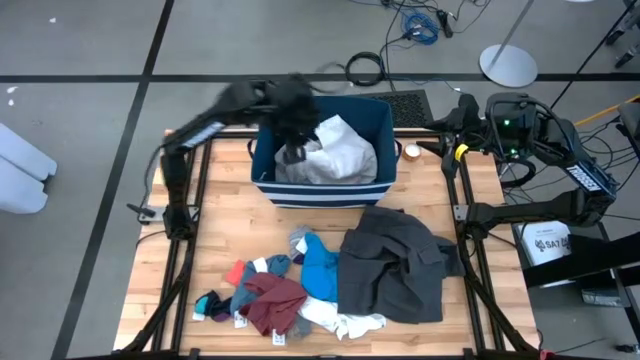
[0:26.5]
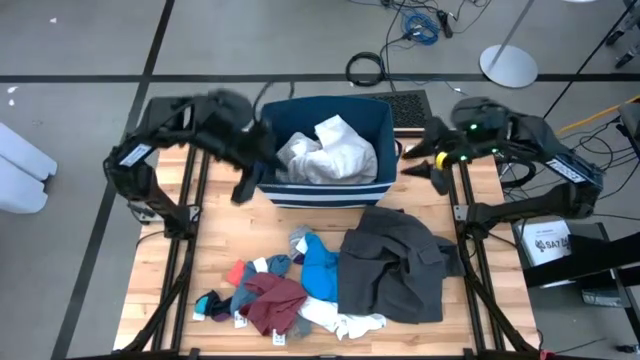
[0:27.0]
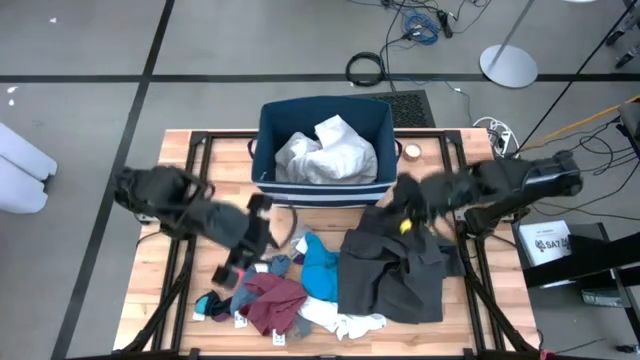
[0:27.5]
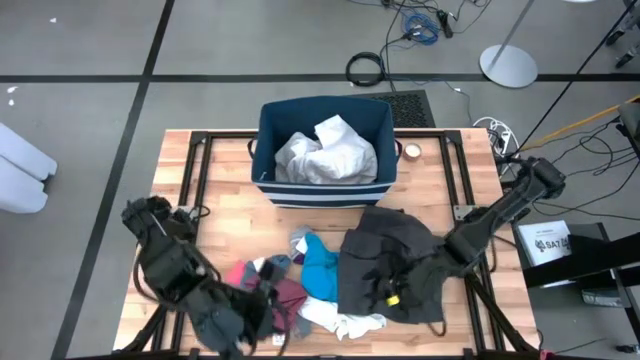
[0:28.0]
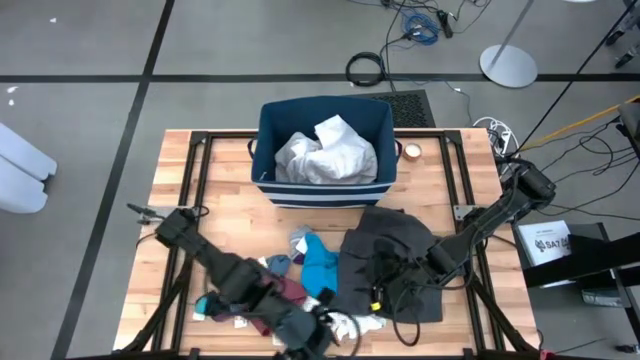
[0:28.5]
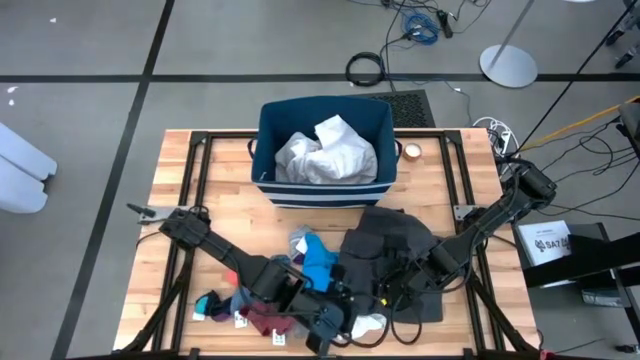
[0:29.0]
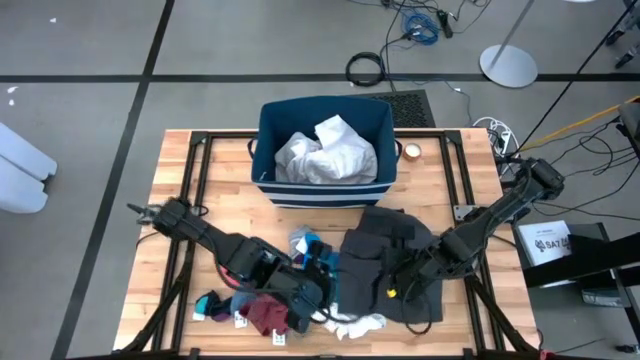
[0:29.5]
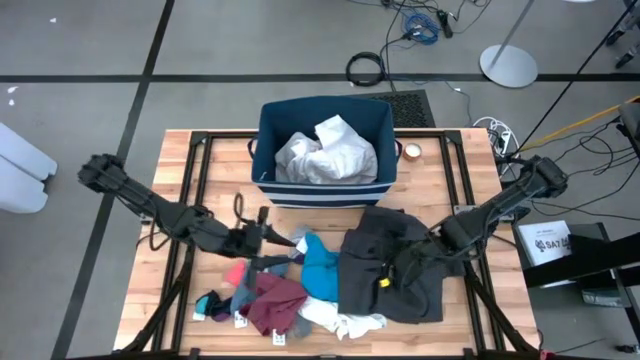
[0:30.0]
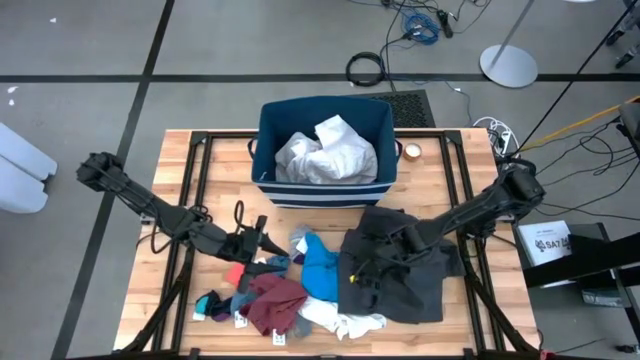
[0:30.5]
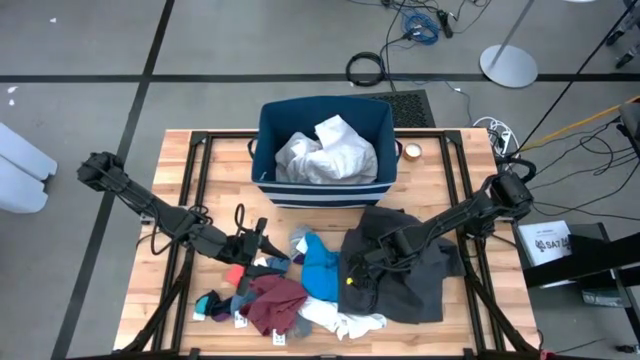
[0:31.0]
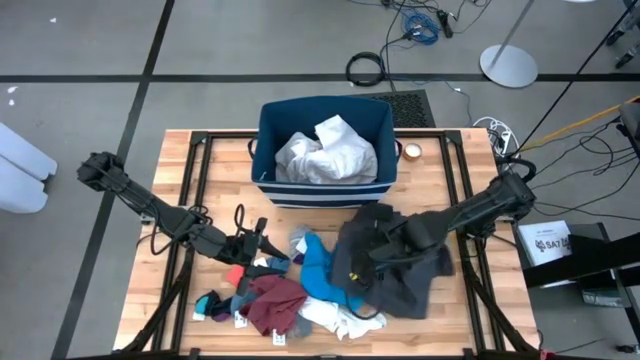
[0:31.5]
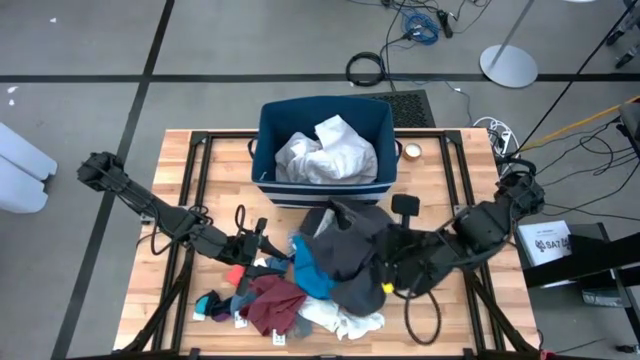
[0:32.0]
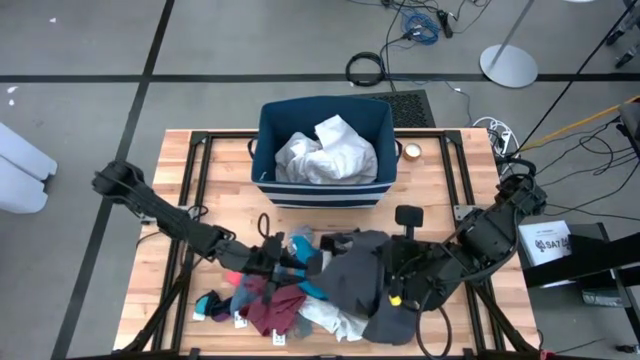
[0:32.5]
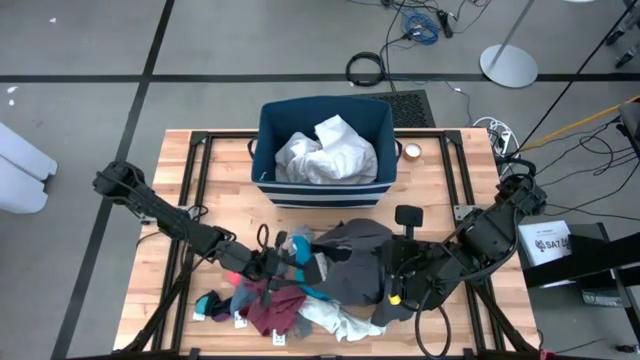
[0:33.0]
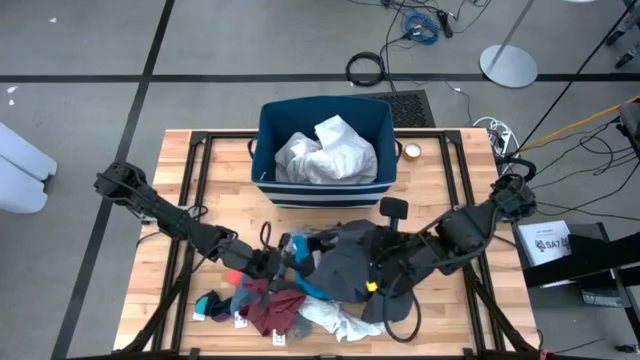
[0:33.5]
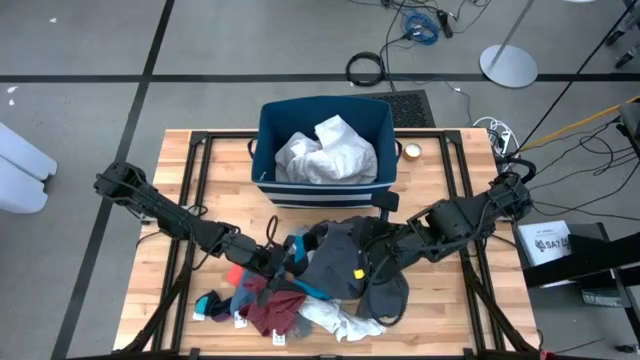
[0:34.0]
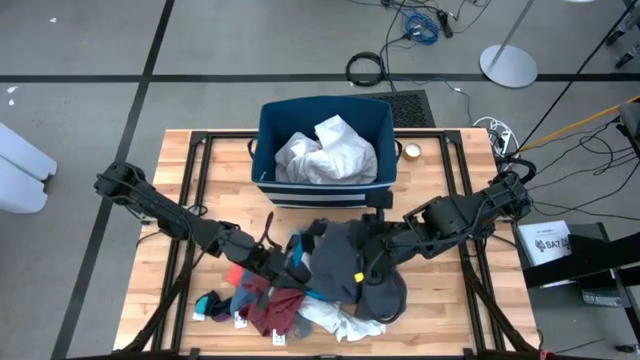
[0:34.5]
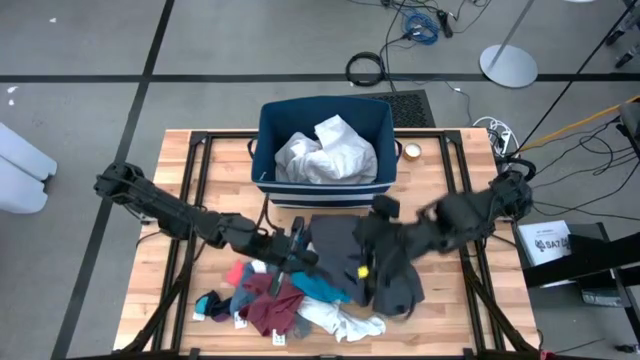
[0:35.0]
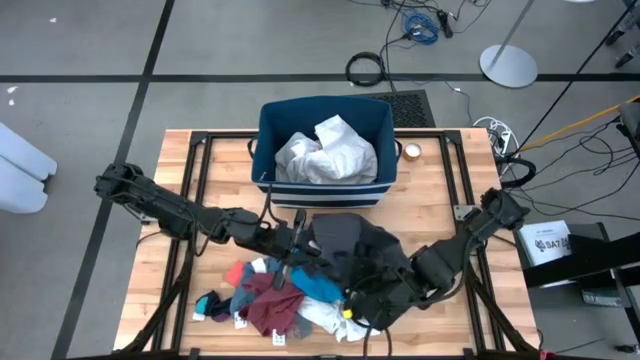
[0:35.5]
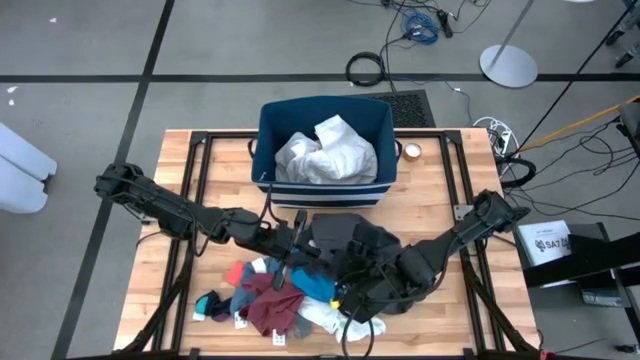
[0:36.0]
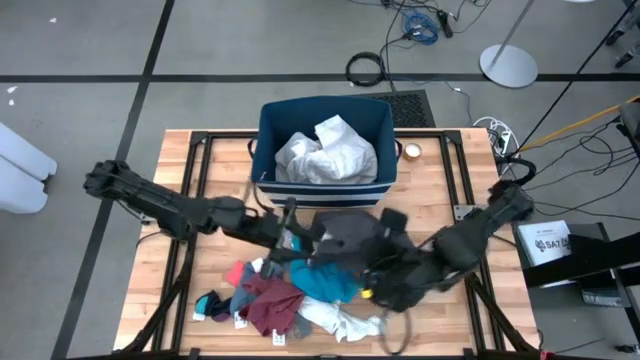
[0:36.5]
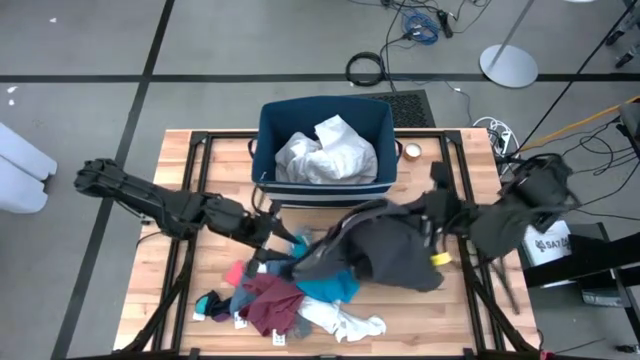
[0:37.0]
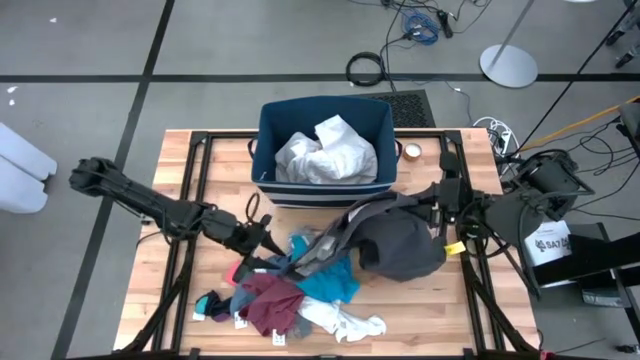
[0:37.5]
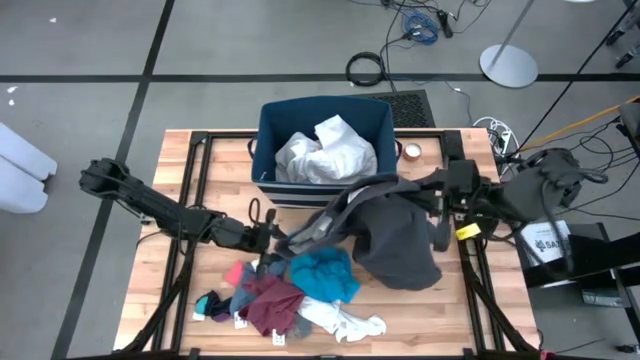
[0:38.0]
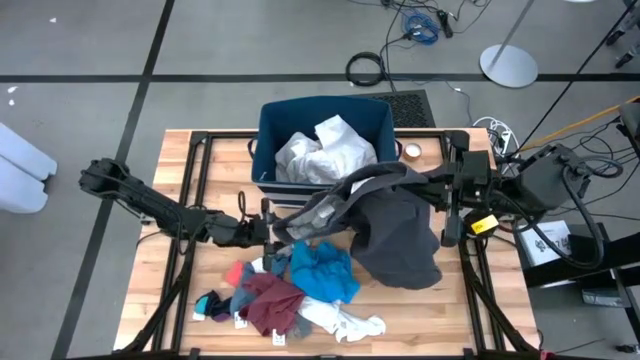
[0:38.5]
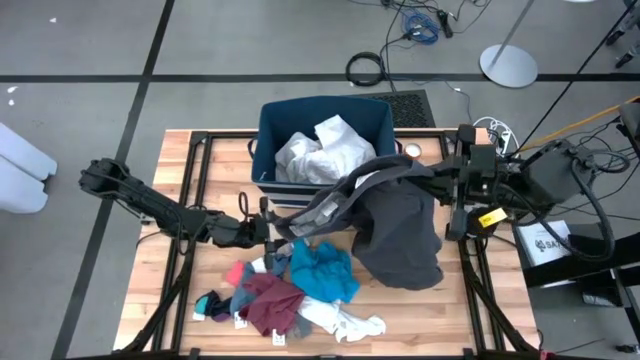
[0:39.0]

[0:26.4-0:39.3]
Task: Sort clothes
Put the dark gray shorts into the blue bin

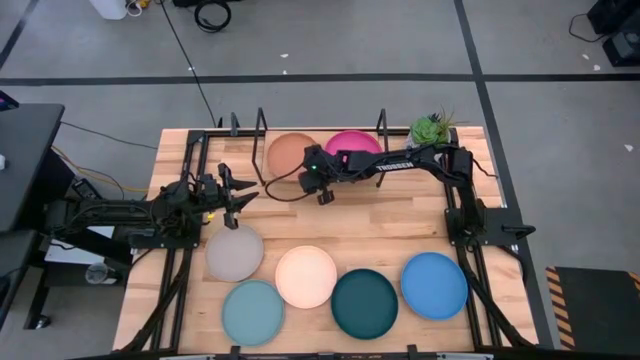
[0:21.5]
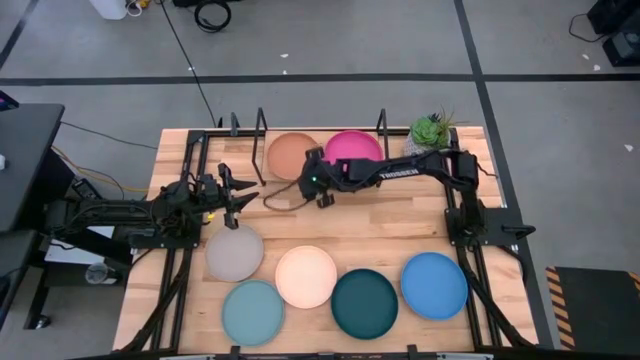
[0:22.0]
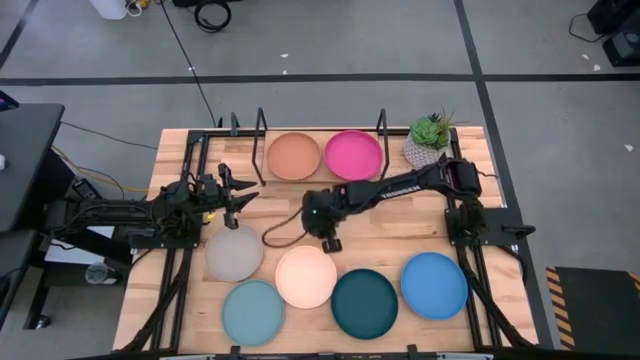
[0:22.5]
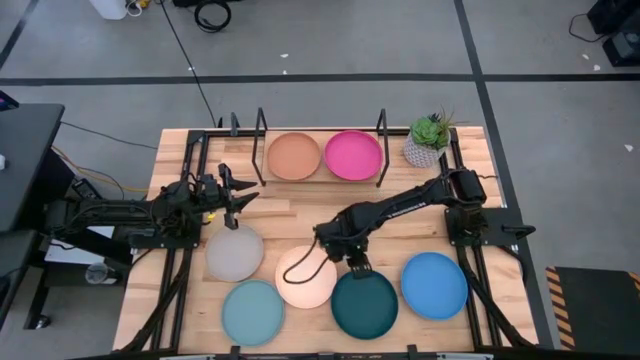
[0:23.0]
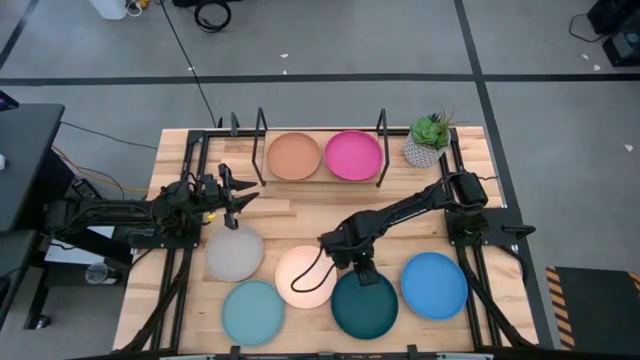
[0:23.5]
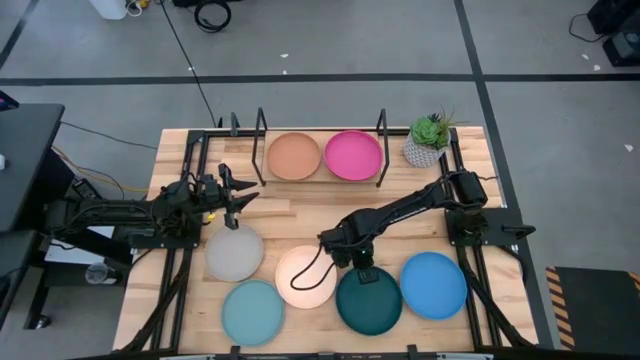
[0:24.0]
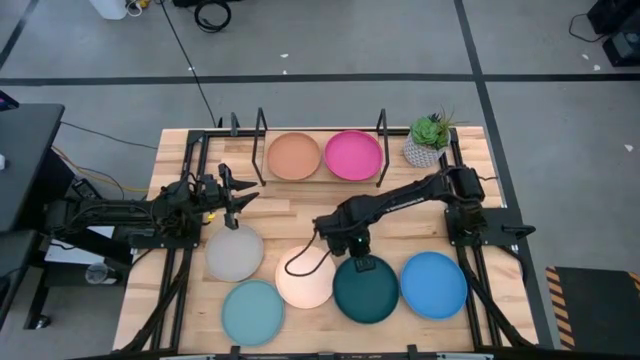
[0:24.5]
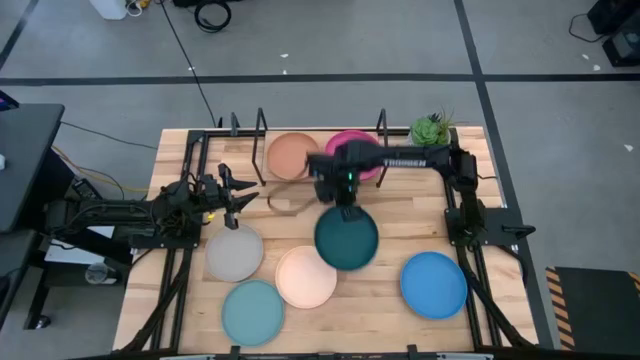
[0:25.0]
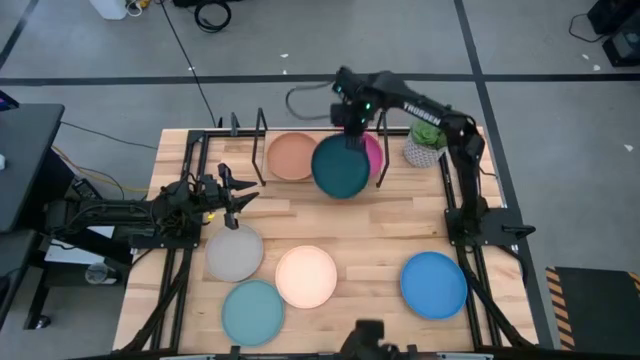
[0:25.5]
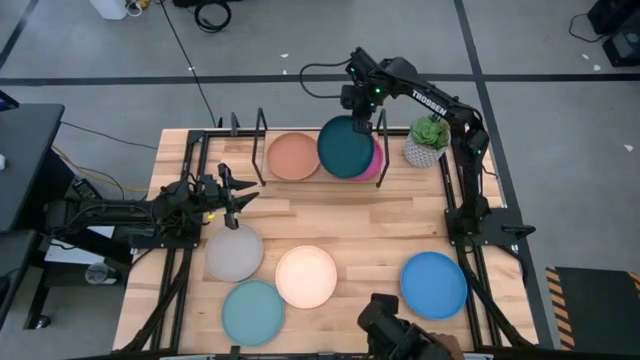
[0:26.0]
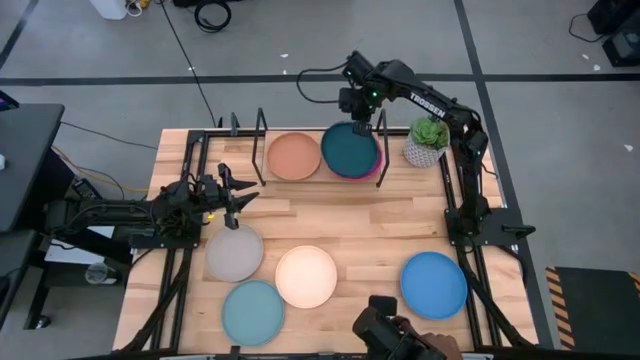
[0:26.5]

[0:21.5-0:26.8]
Task: Place and stack plates onto a shelf
Stack the dark green plate on top of the pink plate on the shelf

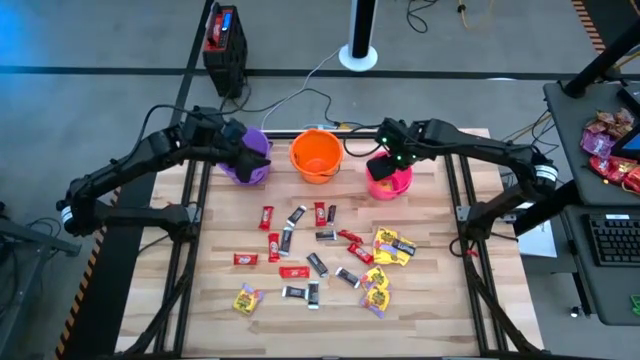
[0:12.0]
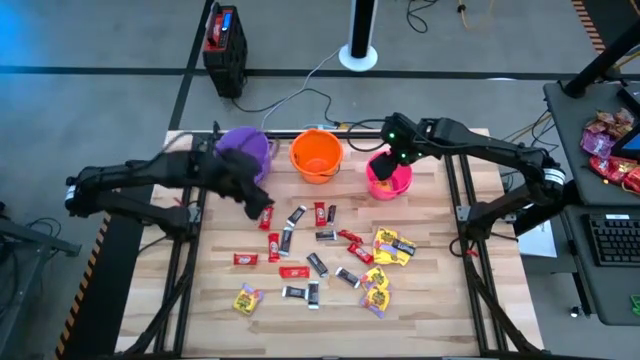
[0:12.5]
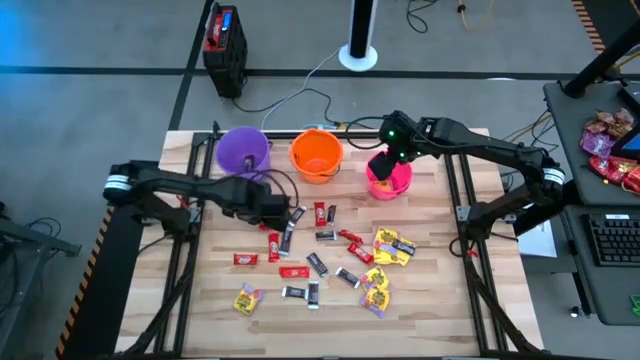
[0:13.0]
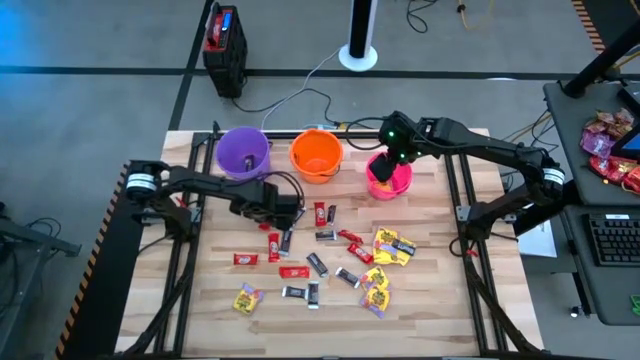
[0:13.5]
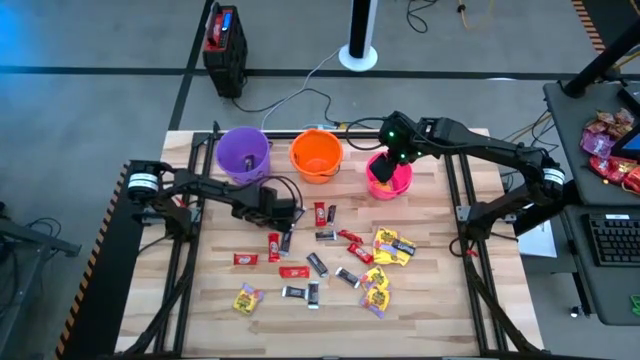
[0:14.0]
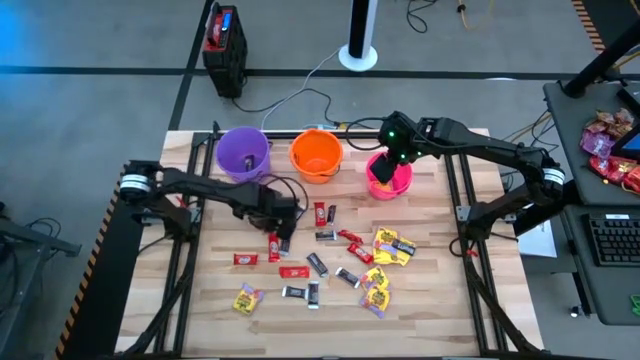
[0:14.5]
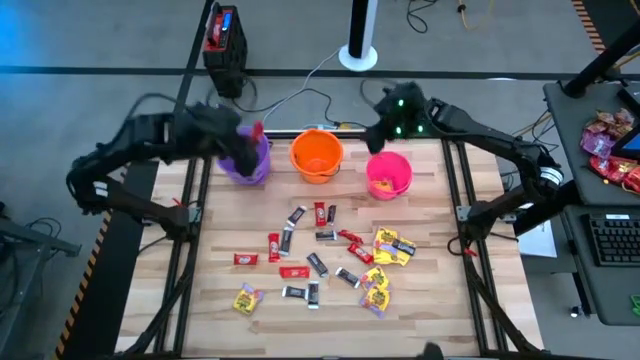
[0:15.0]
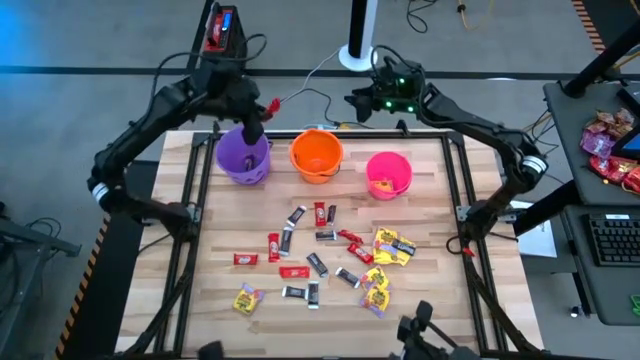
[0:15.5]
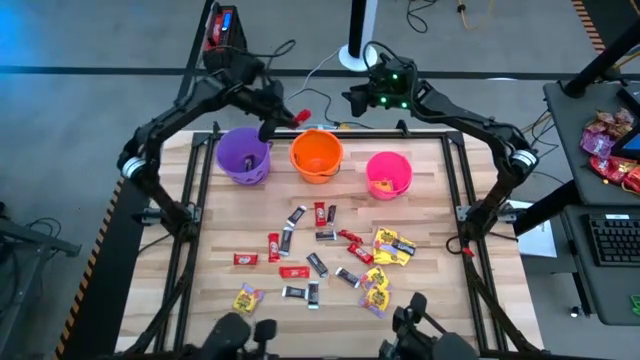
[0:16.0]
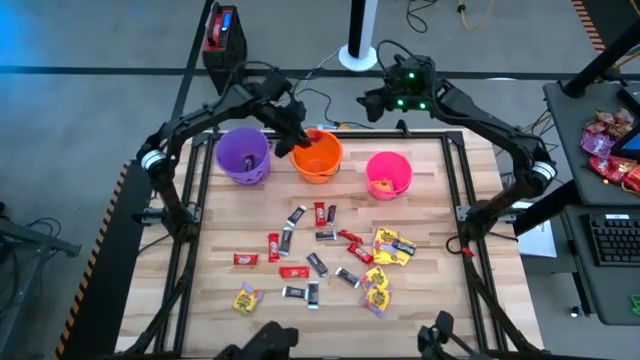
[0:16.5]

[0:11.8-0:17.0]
Task: Sort candy by brand, put in halloween buckets
Put the red candy into the orange bucket
